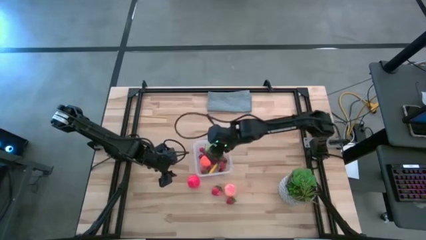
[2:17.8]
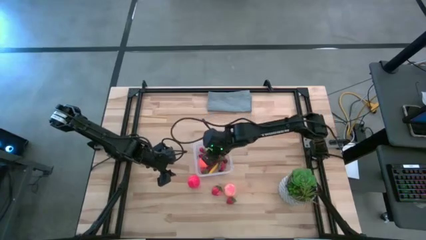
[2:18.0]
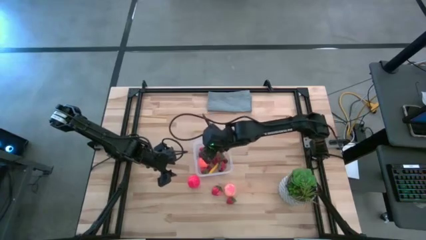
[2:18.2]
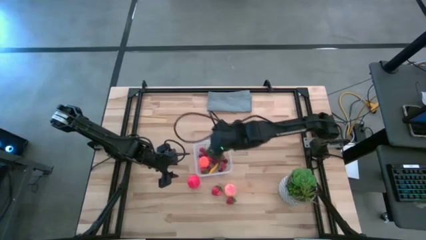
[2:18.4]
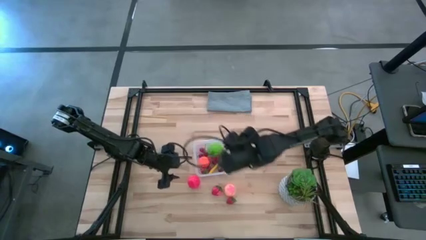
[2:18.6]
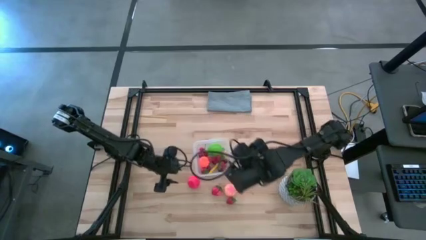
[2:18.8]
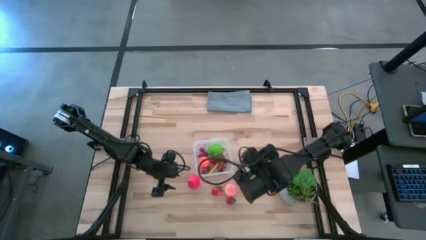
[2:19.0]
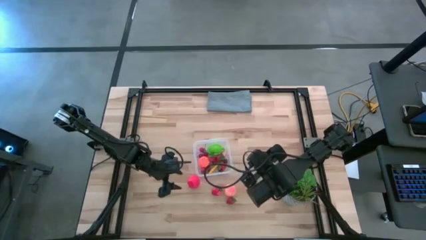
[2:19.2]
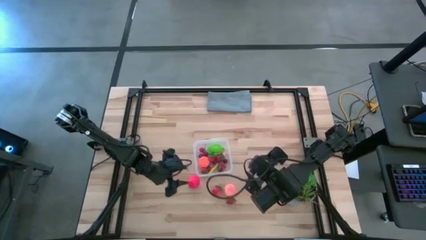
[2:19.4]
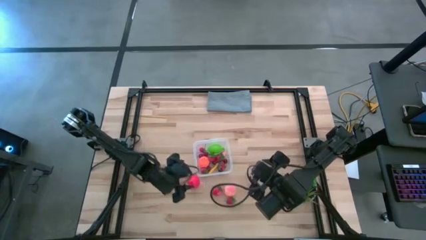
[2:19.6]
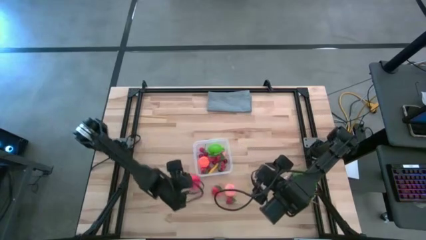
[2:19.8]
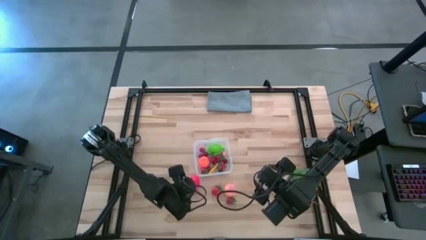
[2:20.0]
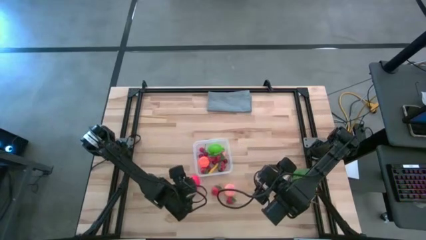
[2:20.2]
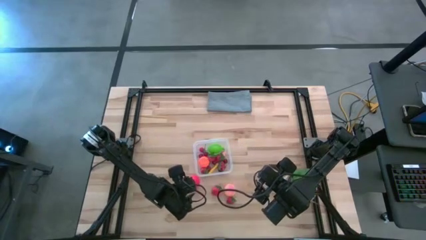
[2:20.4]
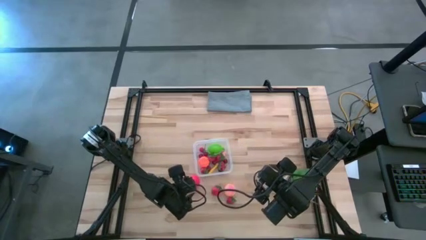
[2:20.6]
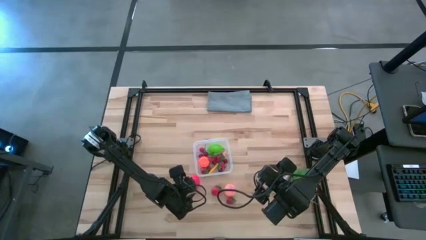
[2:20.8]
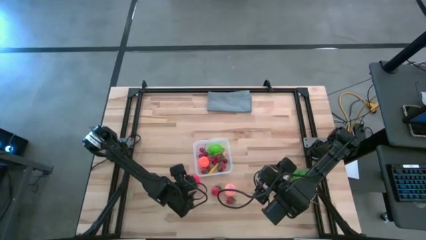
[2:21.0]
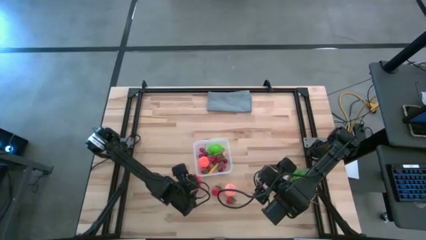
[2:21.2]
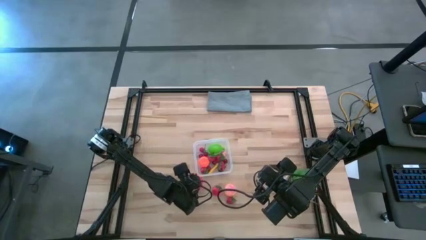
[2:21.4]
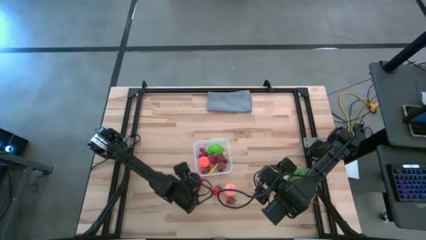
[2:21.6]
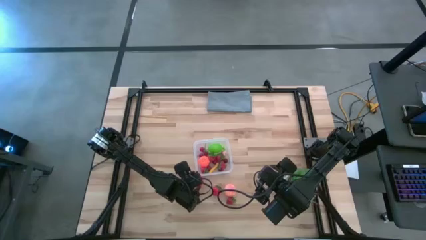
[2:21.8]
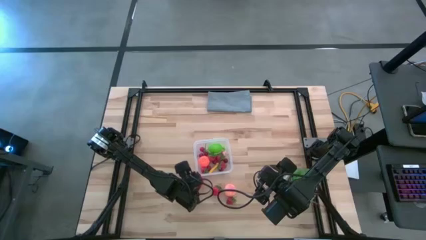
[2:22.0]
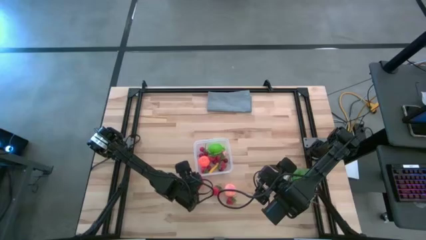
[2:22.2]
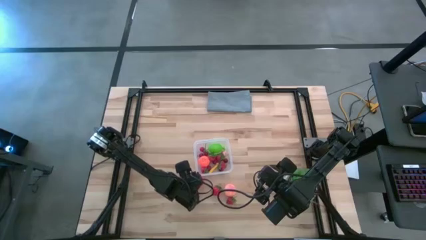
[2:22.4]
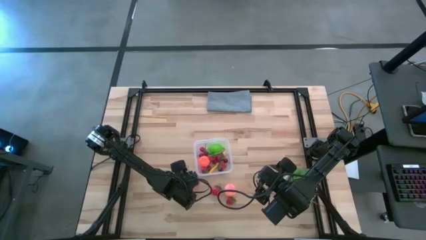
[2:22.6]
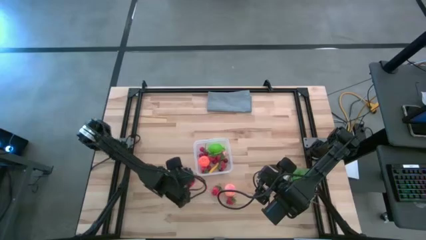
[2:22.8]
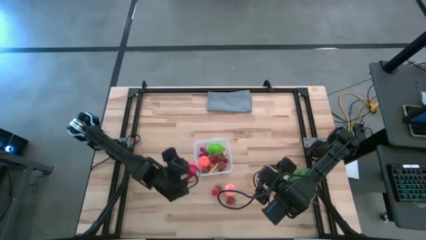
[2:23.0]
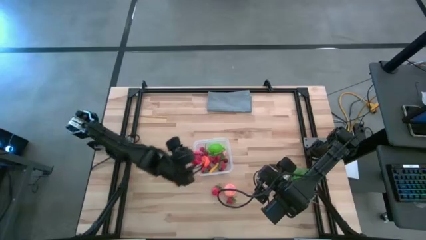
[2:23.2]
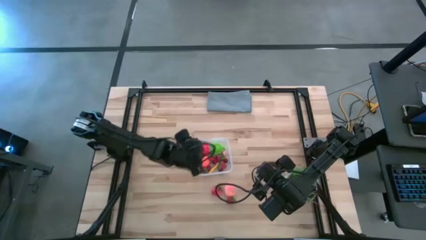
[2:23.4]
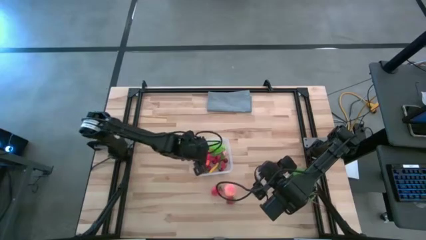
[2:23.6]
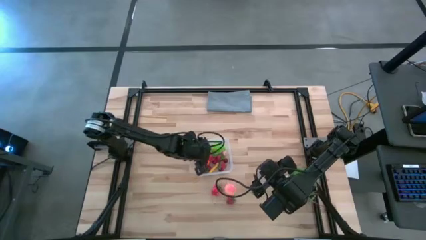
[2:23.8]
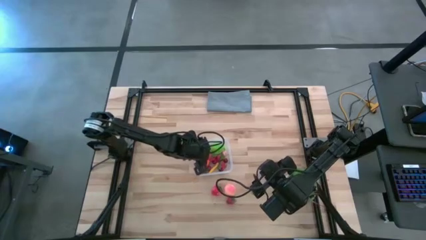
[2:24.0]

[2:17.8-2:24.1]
Task: Pick and placing Produce into tupperware
Put the red apple into the transparent container

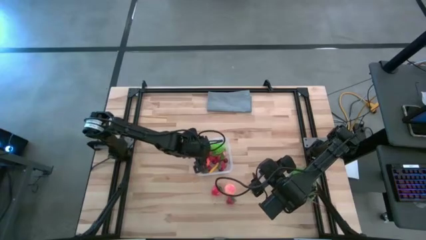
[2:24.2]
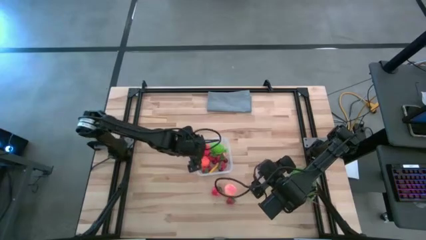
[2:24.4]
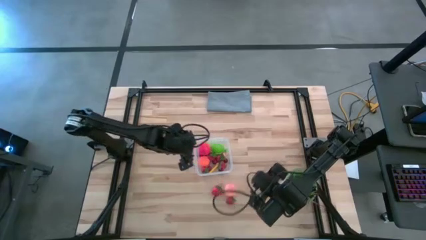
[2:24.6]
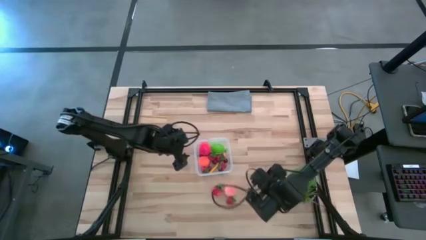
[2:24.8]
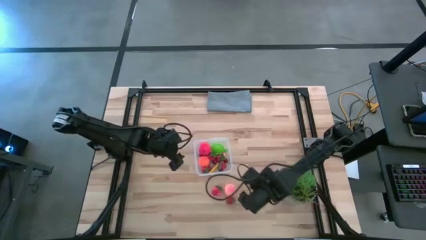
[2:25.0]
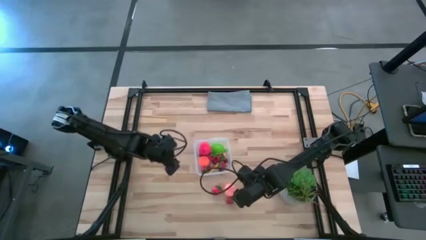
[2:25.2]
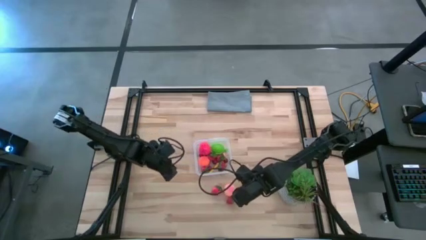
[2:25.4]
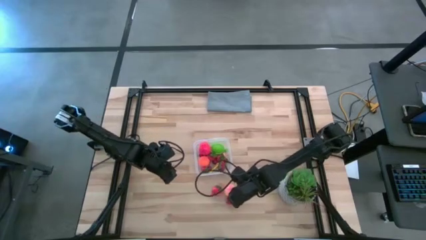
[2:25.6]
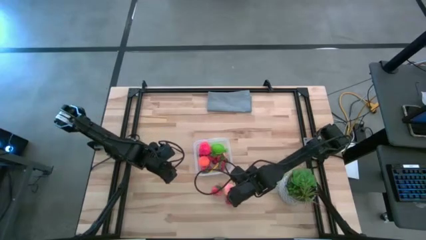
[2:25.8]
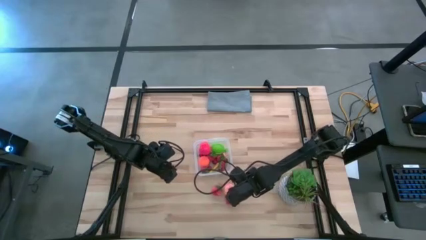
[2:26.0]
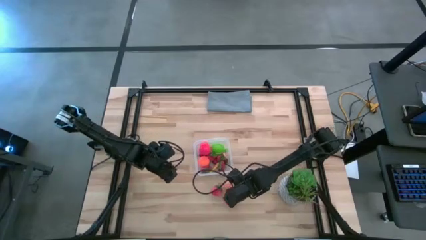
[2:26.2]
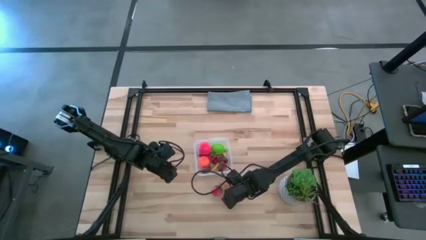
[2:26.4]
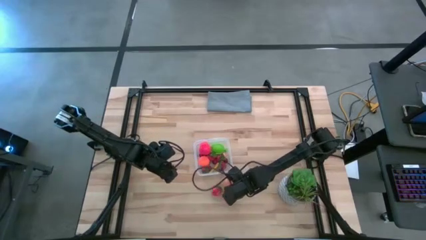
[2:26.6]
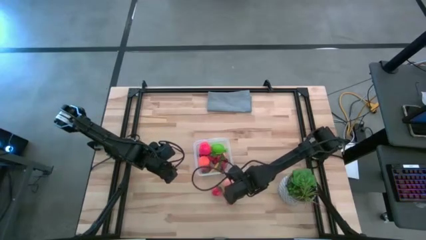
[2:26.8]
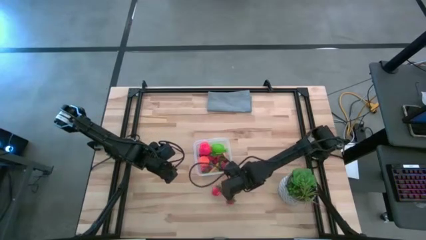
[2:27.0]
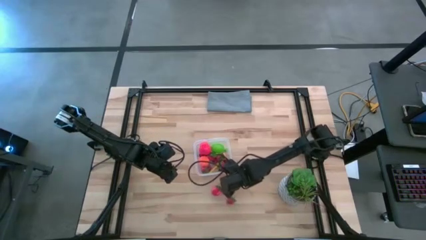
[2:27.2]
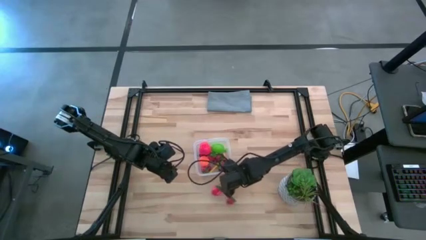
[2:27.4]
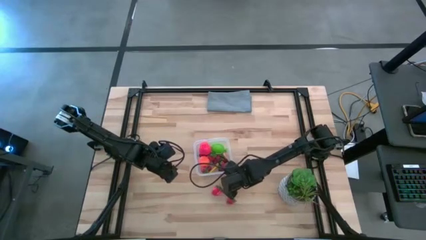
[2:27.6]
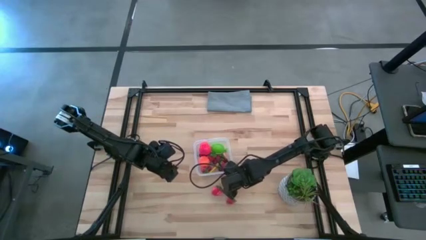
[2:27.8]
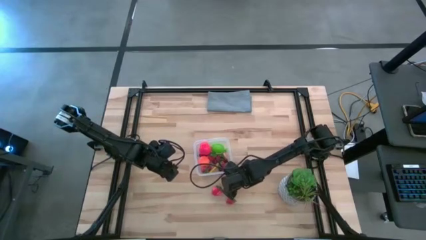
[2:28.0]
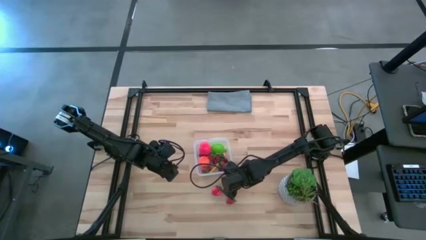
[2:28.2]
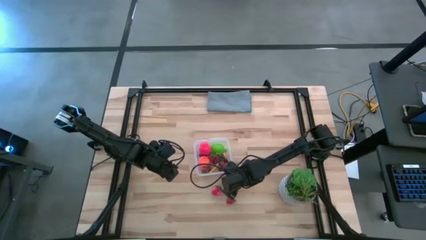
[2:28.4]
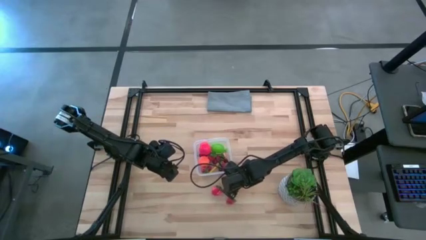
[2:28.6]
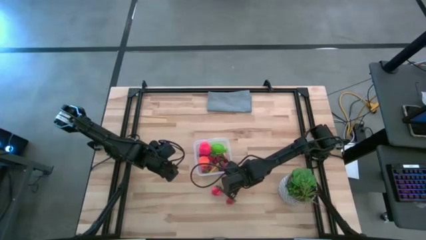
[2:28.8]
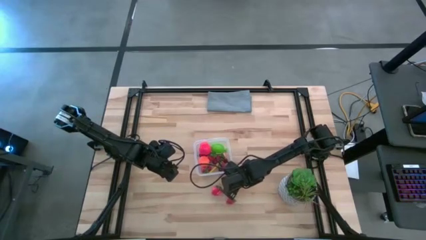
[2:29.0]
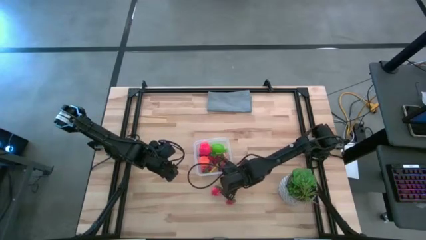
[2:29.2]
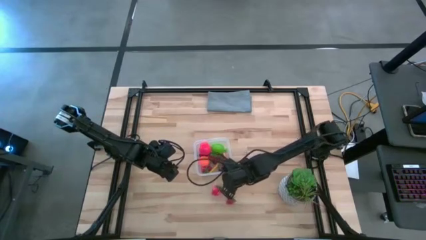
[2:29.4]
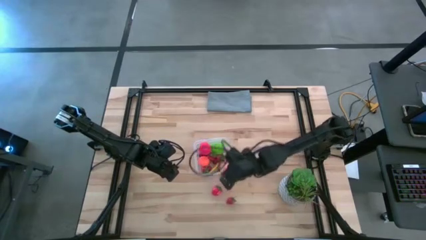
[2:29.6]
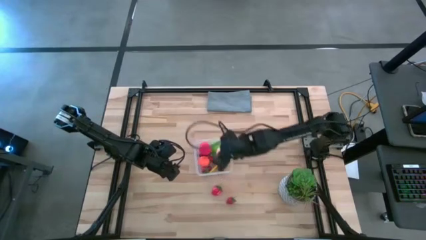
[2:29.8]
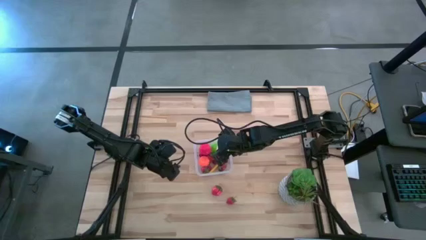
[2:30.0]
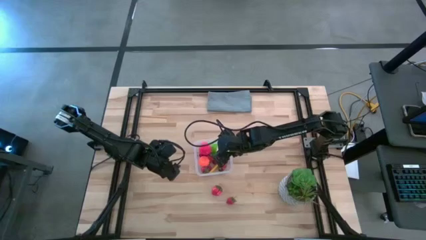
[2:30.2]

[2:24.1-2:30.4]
Put the pink apricot into the transparent container

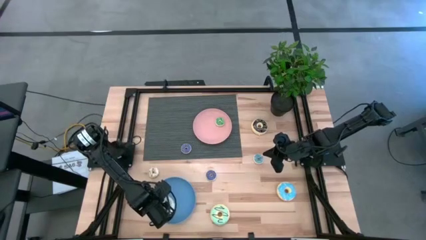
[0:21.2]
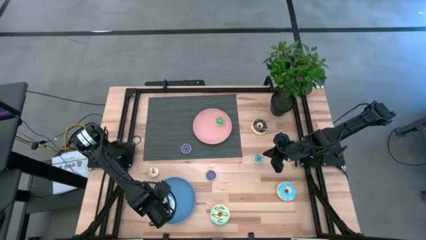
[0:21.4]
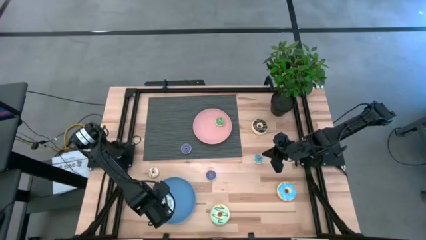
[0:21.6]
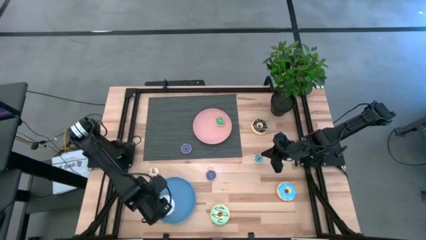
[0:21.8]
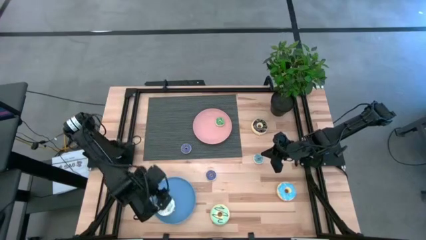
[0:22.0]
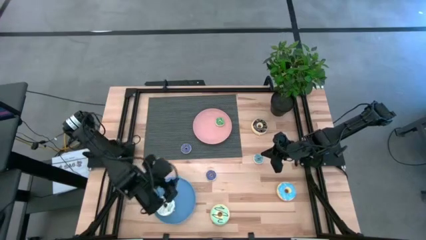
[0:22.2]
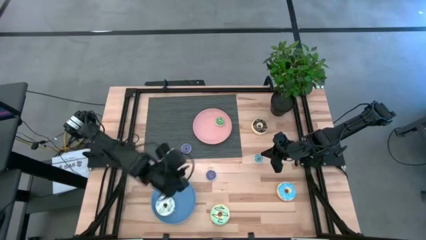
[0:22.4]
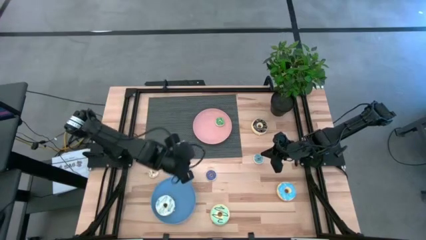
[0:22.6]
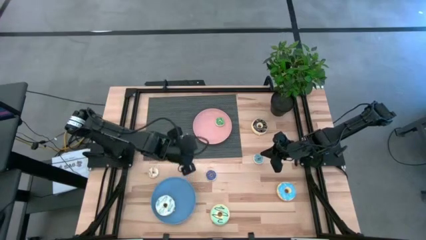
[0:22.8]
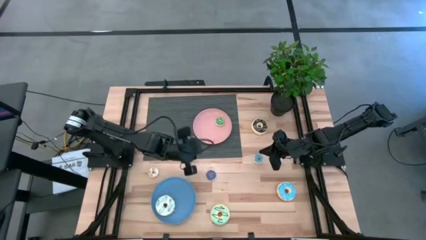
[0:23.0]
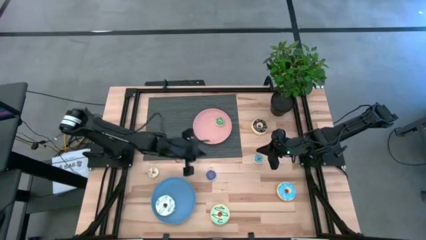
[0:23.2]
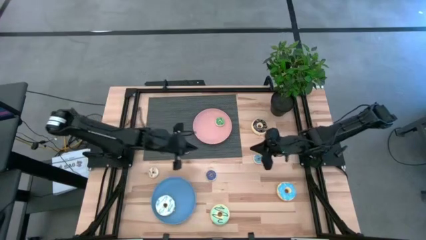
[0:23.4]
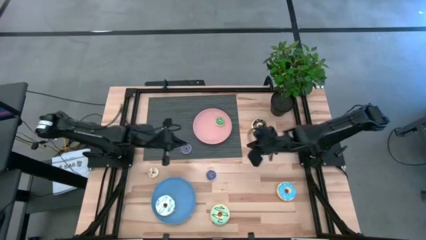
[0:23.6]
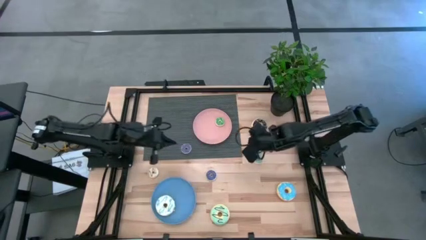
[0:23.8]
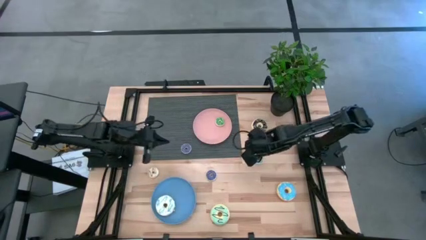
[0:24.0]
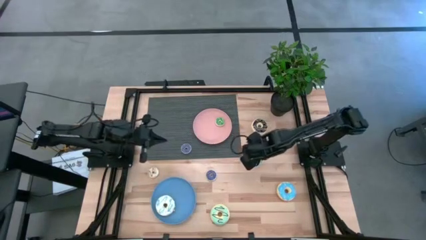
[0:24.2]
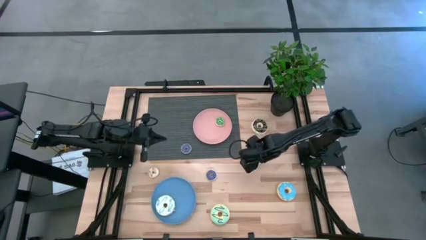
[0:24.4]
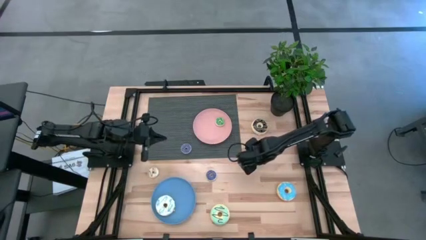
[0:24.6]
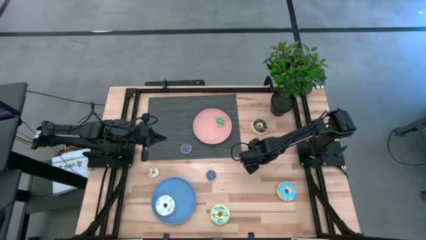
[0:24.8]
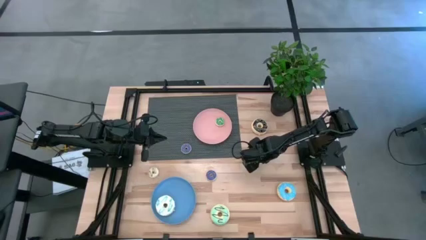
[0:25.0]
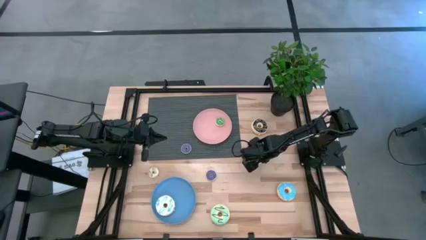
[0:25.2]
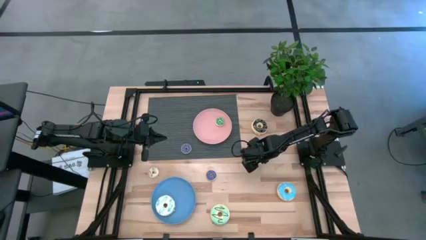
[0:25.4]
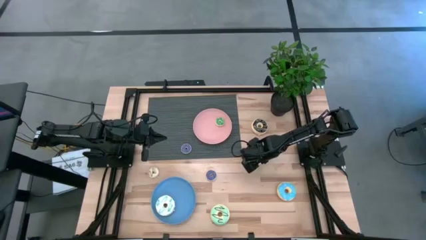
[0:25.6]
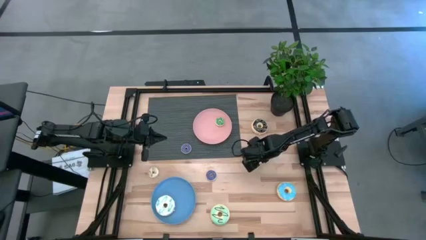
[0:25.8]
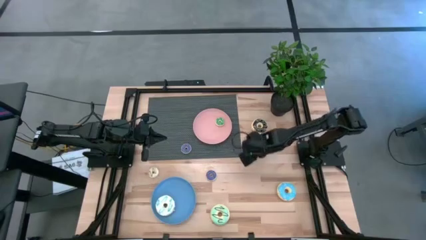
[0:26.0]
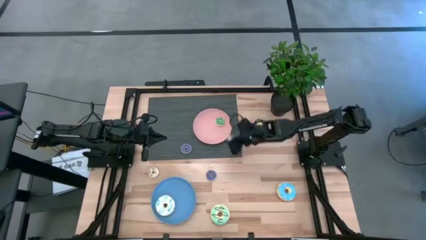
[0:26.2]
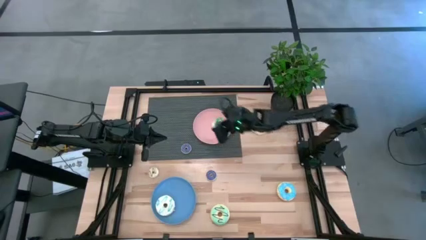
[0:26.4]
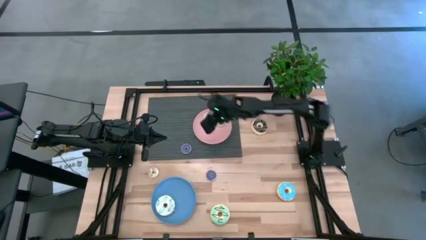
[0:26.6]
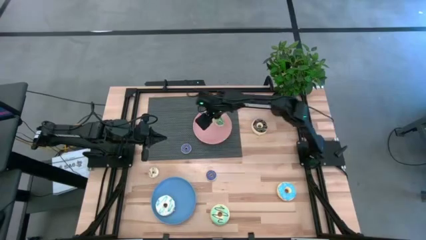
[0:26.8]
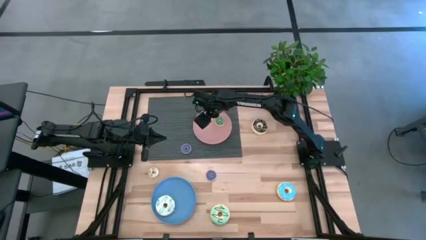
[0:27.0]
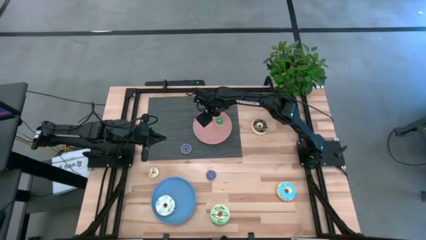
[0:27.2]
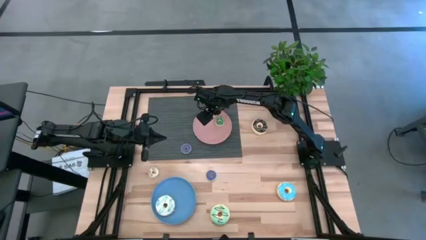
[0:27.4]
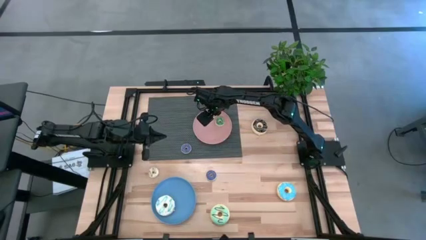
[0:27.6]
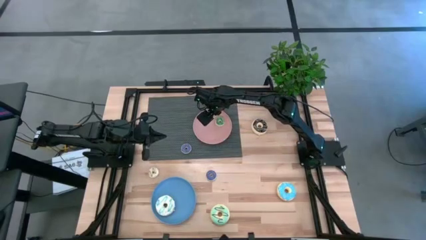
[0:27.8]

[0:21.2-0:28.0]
Task: Pick & Place donuts
Put the small light blue donut on the pink plate
